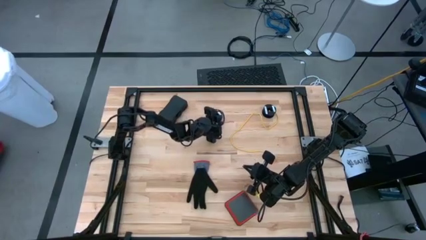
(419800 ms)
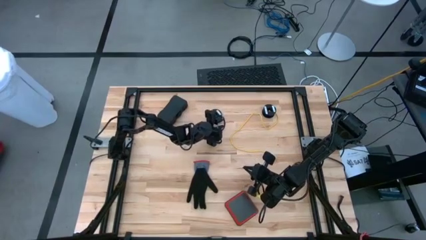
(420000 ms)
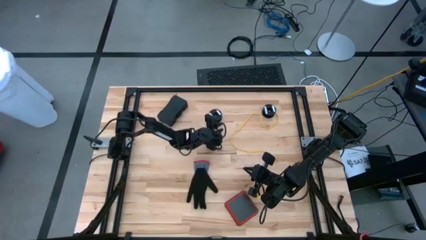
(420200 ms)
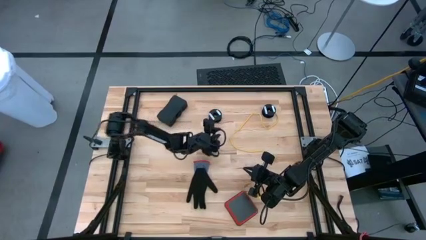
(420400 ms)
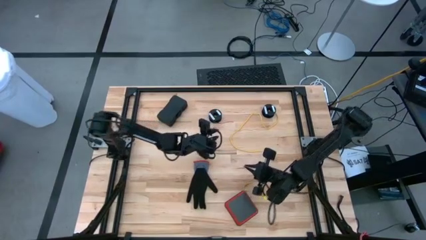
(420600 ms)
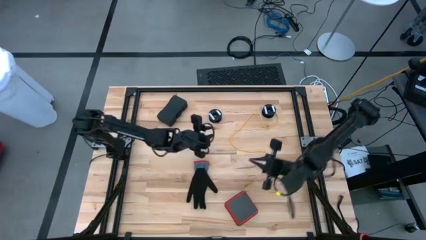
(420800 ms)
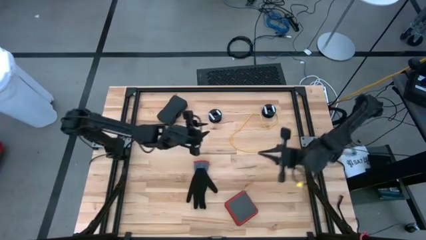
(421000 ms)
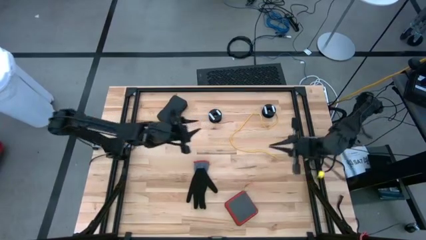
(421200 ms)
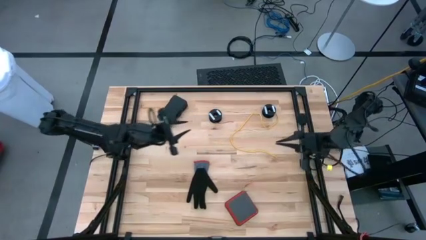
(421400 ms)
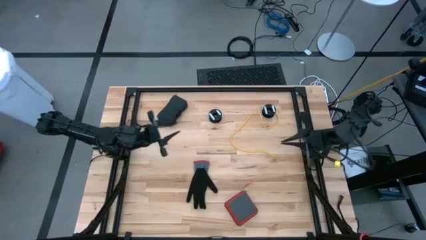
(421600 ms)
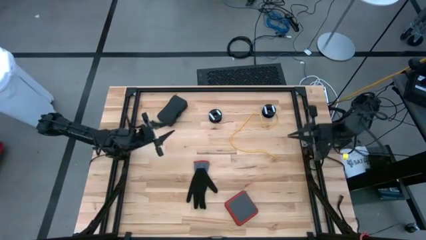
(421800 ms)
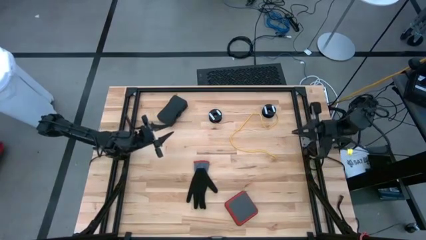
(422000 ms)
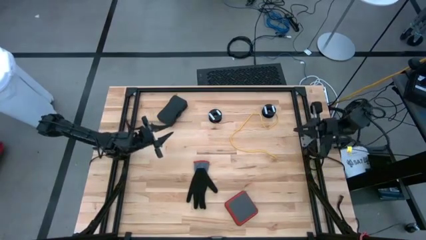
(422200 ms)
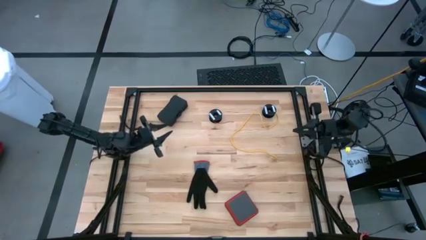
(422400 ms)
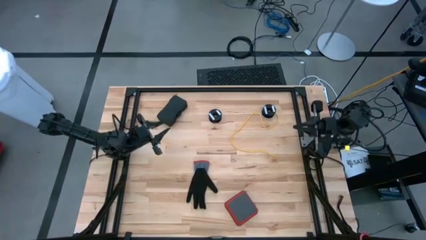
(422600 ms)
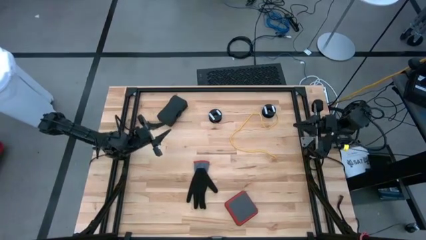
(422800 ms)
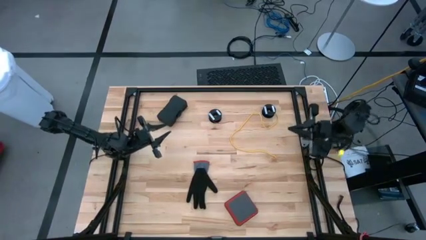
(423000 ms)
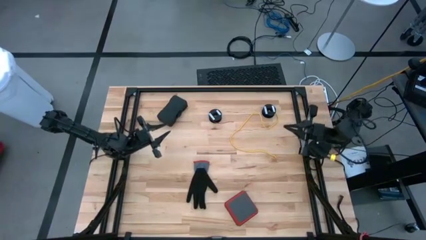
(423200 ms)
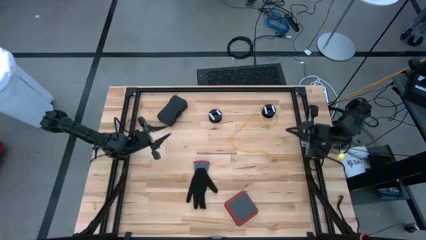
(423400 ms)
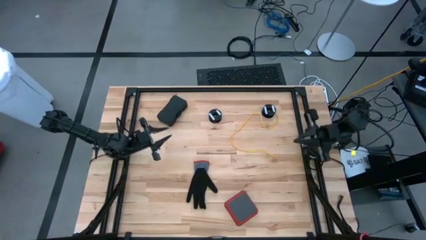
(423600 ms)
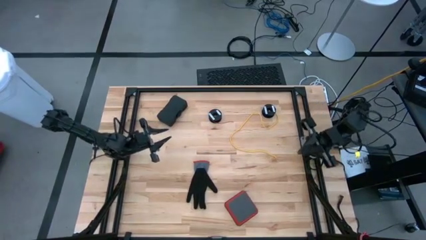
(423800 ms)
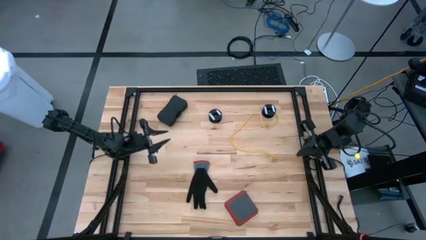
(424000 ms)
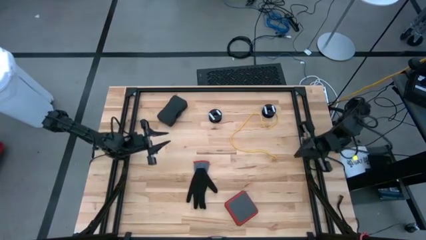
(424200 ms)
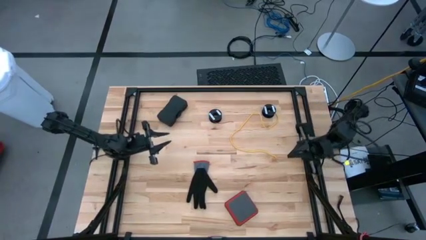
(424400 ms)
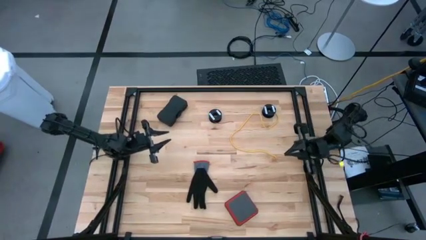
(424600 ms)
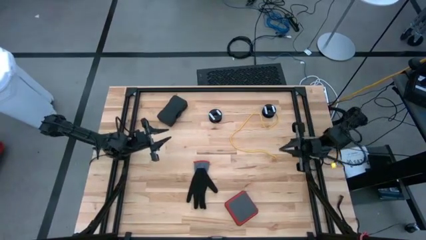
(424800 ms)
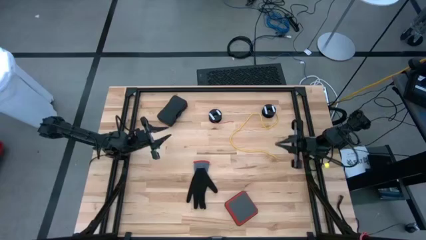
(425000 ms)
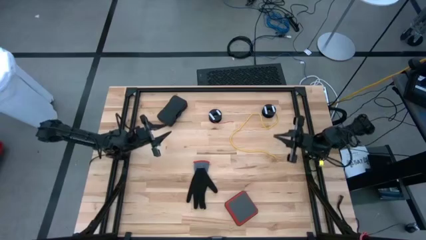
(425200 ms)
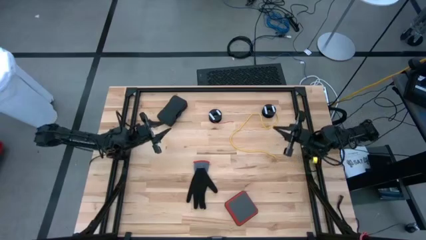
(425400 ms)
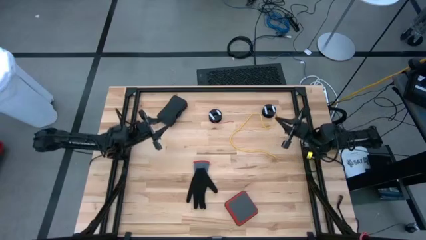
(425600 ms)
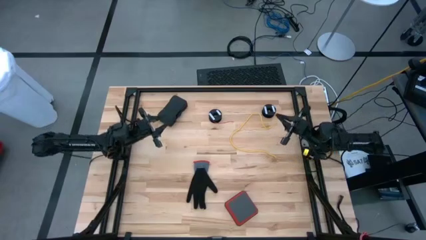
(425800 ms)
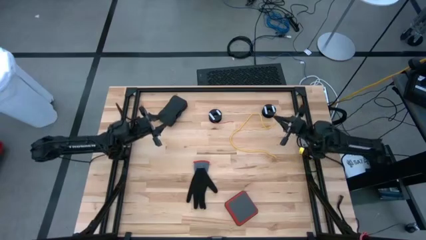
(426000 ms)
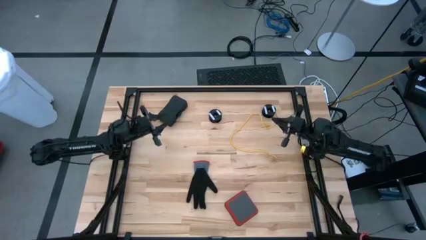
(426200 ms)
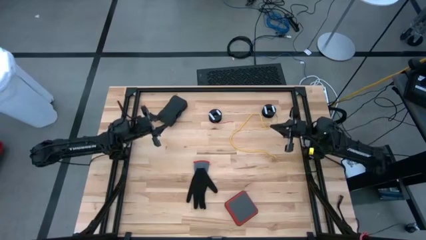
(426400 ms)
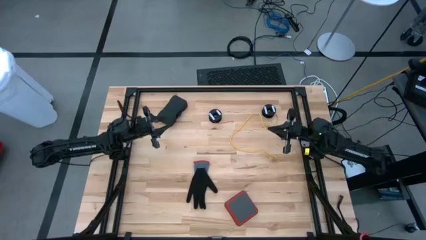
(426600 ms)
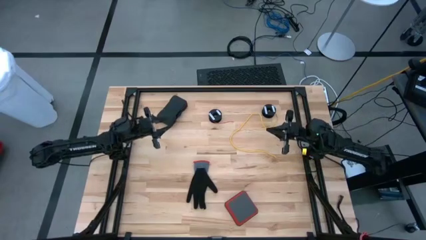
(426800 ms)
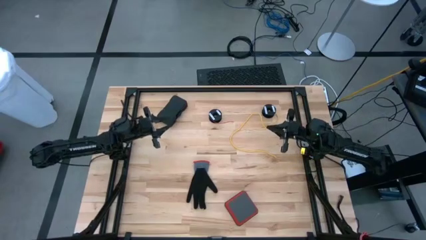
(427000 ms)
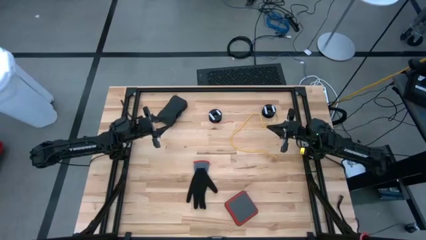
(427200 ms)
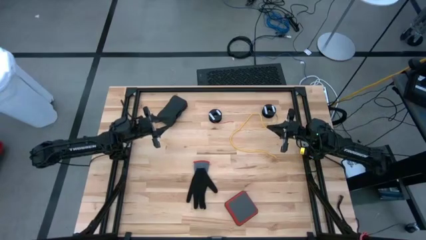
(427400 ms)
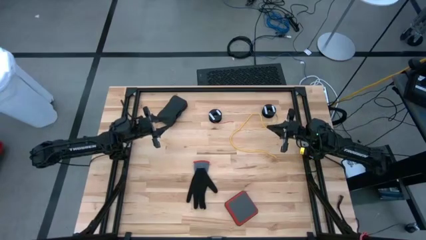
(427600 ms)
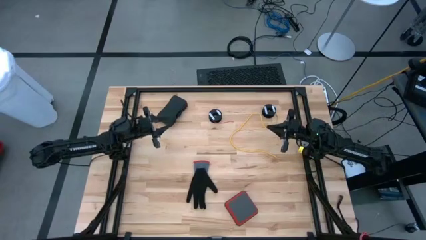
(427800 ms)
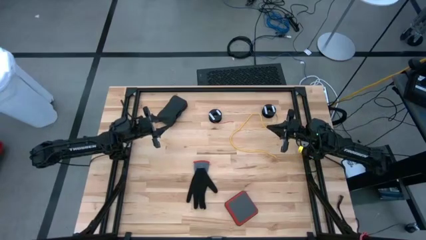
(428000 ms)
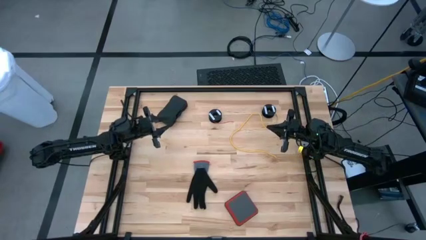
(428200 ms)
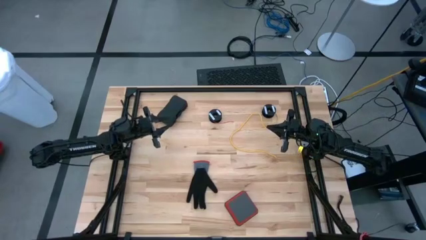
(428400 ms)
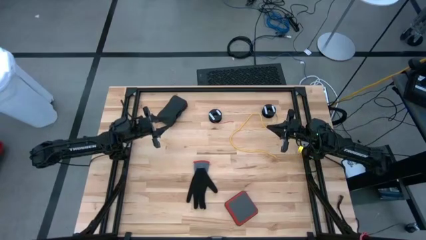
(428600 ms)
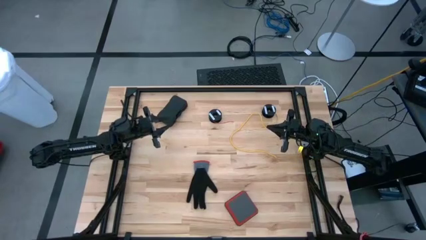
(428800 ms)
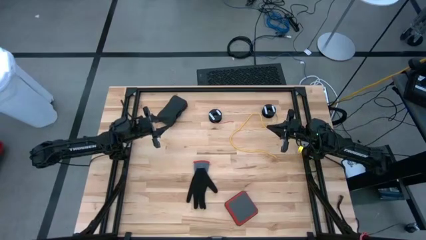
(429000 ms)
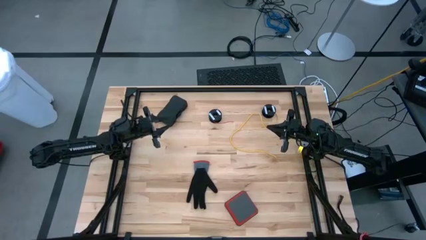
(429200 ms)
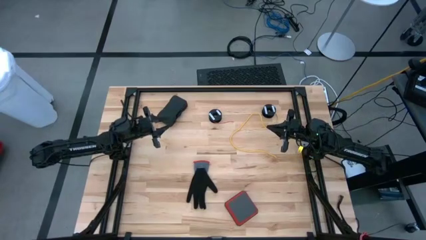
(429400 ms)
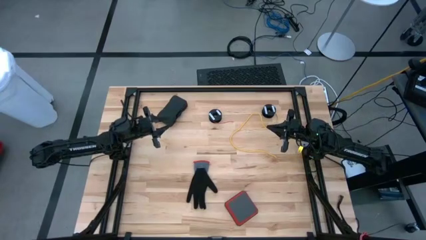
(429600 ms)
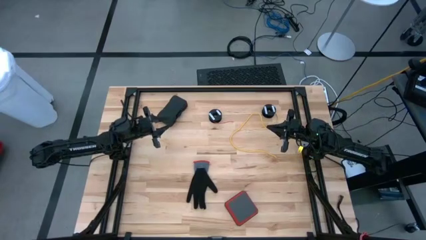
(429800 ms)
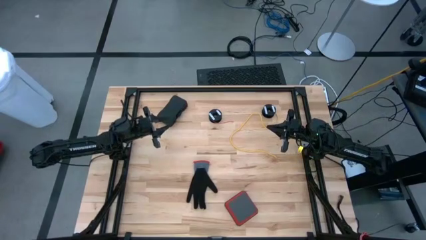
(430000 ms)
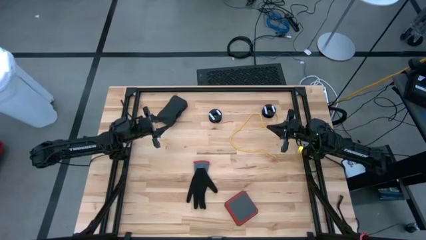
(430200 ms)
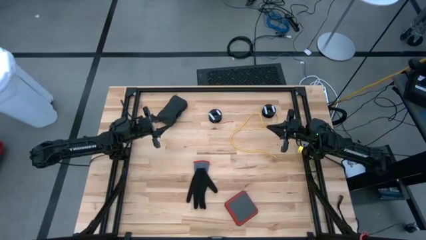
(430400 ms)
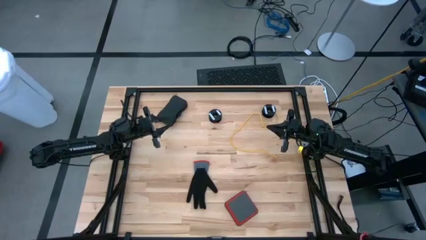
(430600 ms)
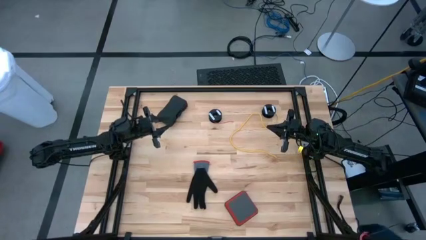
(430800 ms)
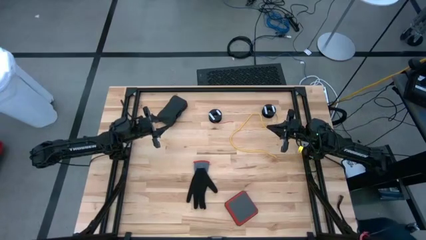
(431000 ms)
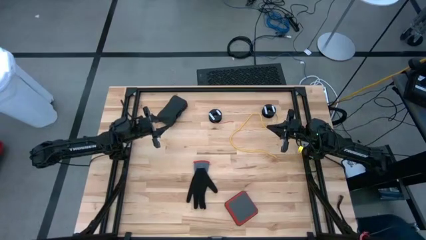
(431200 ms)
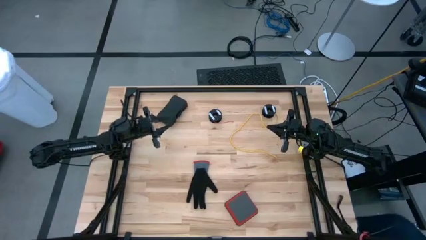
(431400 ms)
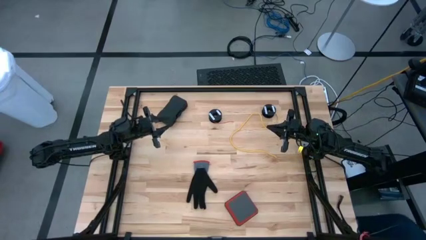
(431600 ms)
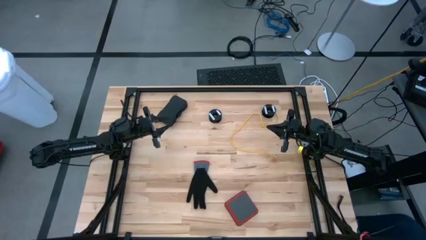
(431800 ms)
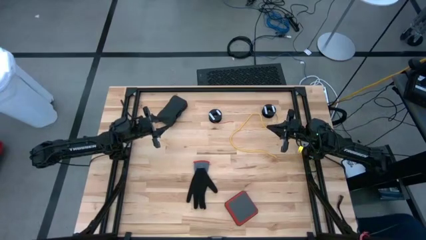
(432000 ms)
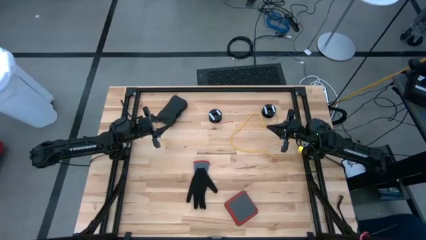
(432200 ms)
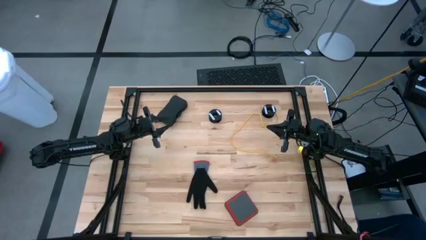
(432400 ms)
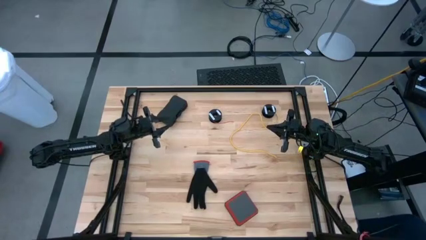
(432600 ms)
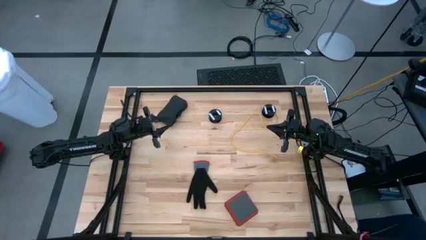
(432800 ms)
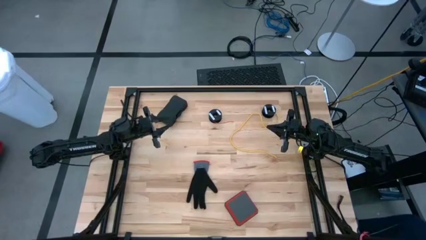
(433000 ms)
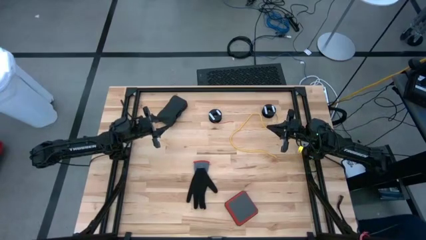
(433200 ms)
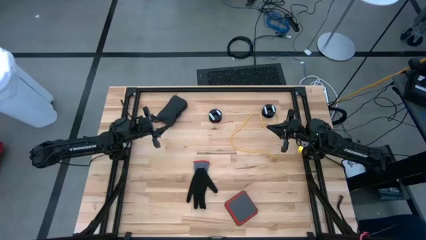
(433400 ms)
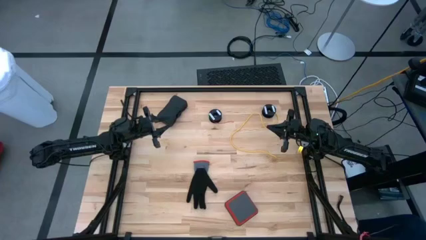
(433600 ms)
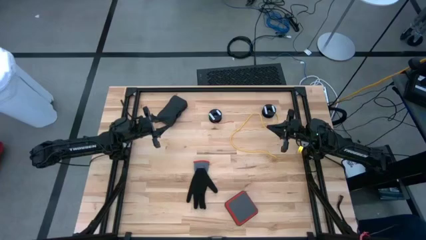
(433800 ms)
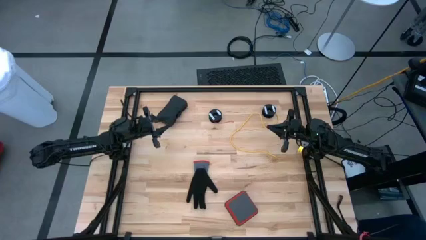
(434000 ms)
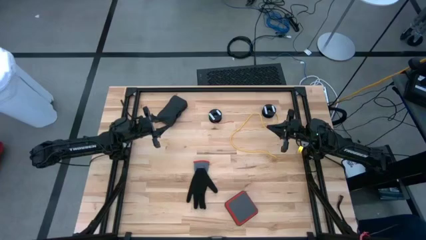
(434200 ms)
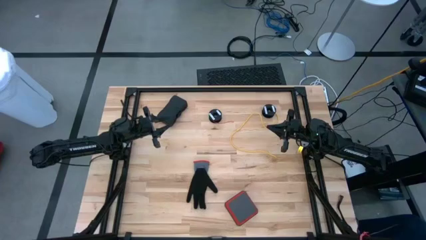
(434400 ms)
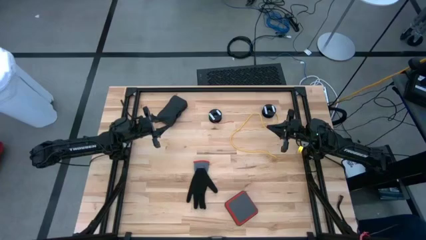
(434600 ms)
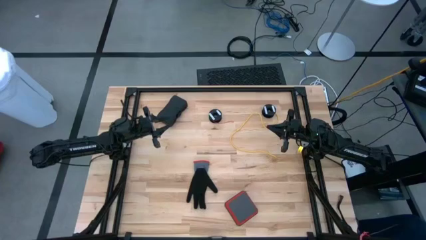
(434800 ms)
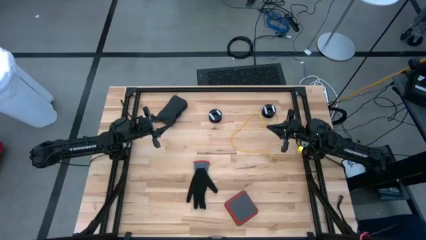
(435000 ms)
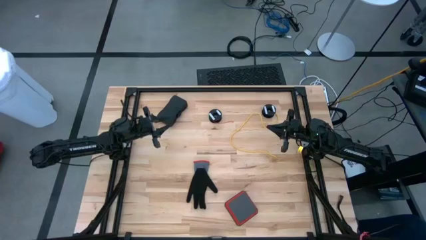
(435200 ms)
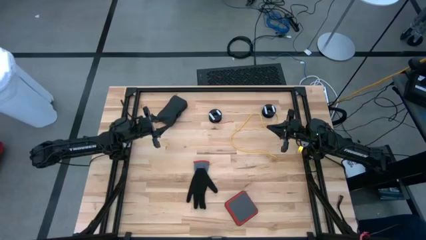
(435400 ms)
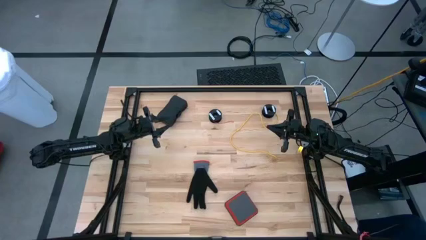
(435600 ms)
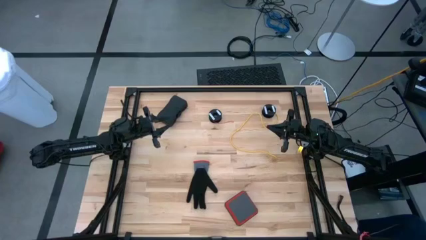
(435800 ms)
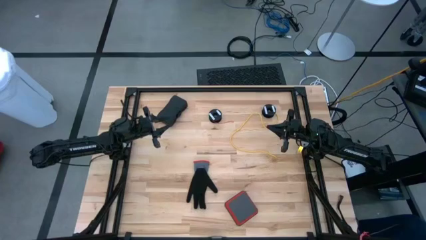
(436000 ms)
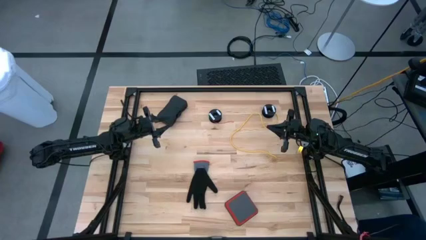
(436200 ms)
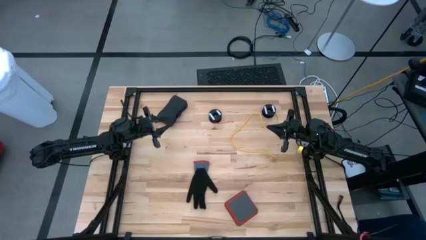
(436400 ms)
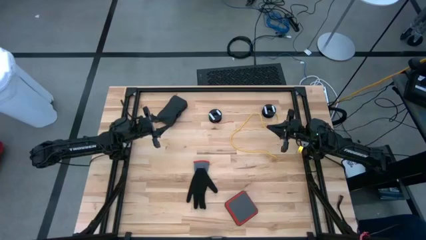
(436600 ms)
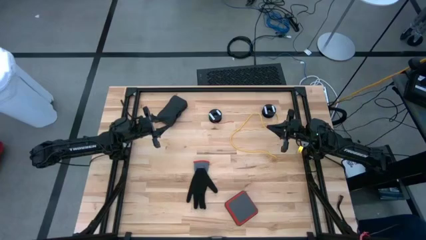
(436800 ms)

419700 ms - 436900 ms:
Task: Coil cords
Return to Home Position
